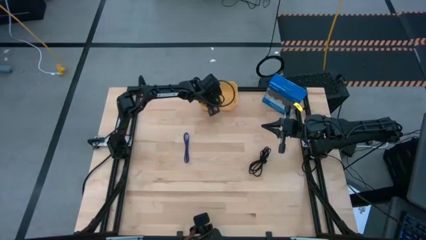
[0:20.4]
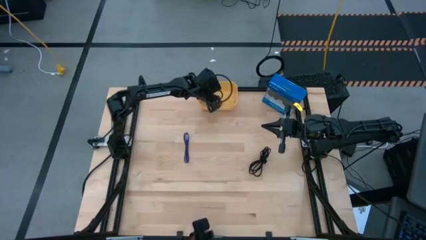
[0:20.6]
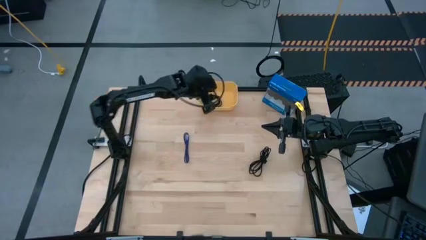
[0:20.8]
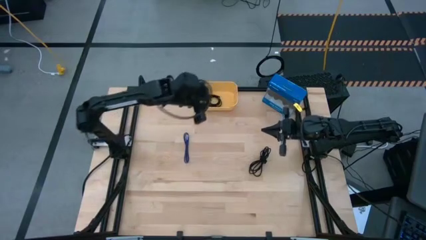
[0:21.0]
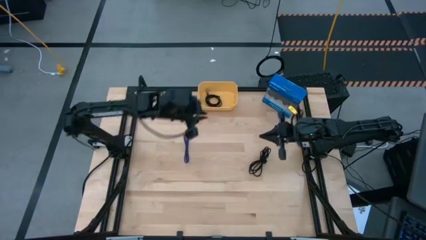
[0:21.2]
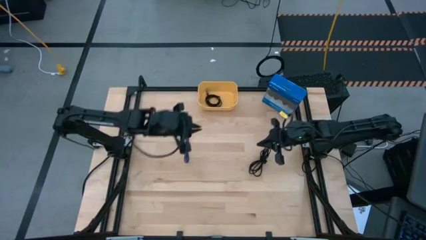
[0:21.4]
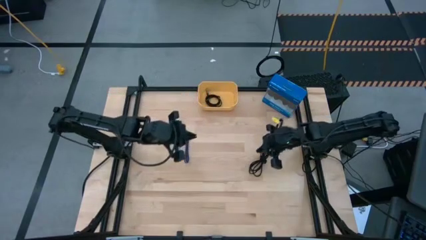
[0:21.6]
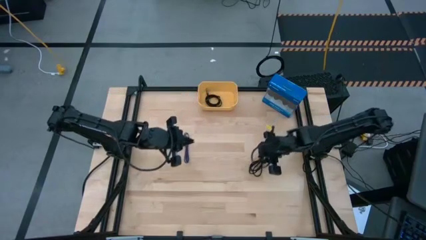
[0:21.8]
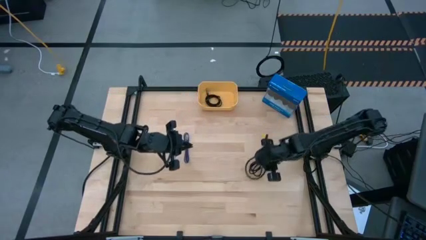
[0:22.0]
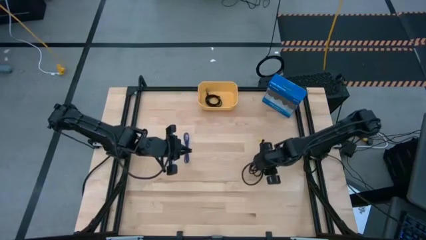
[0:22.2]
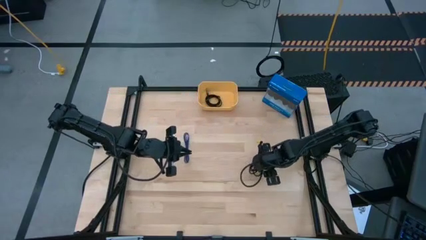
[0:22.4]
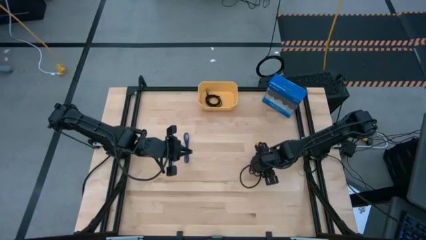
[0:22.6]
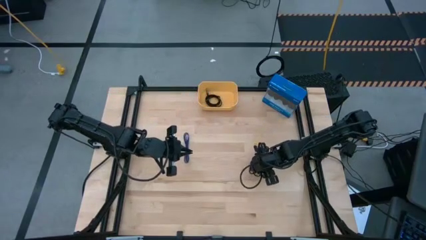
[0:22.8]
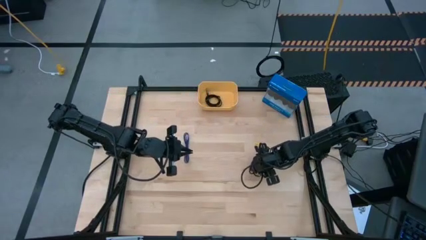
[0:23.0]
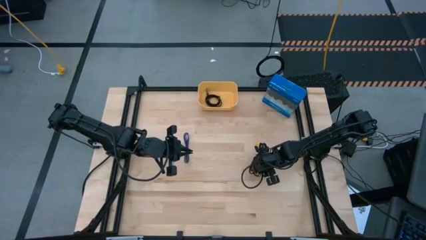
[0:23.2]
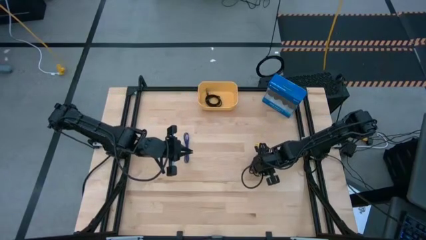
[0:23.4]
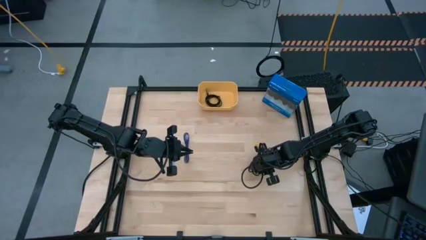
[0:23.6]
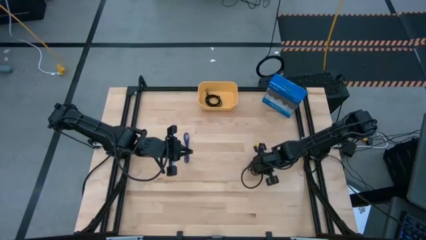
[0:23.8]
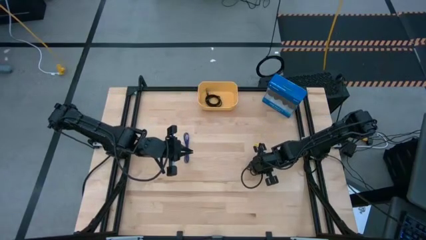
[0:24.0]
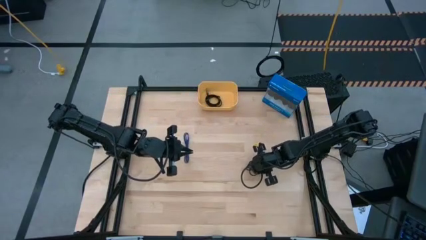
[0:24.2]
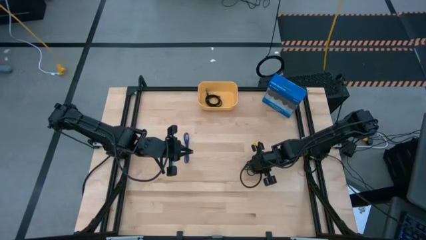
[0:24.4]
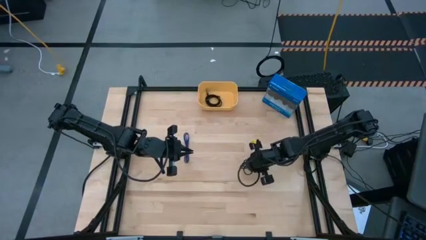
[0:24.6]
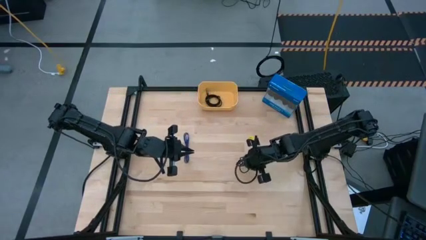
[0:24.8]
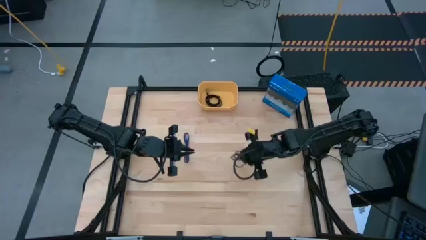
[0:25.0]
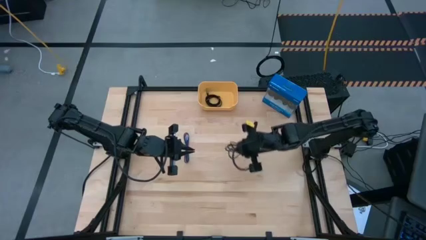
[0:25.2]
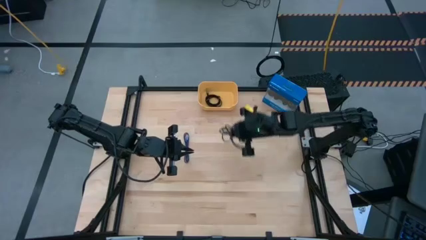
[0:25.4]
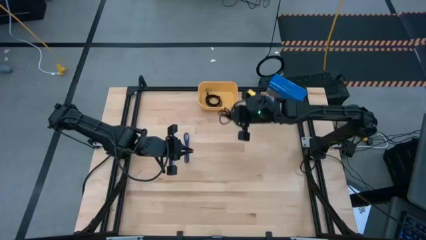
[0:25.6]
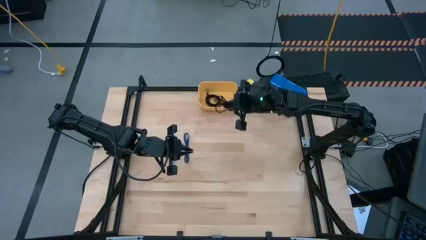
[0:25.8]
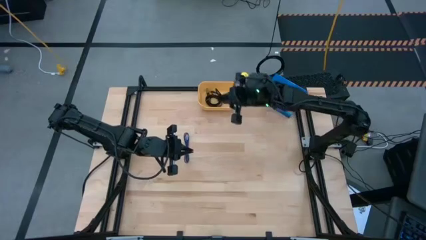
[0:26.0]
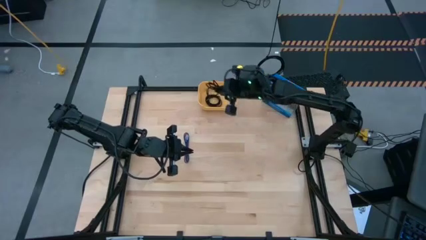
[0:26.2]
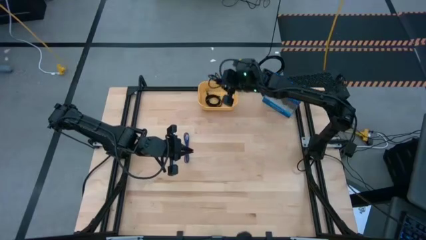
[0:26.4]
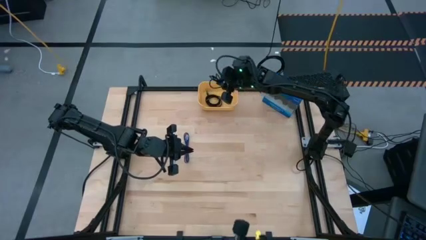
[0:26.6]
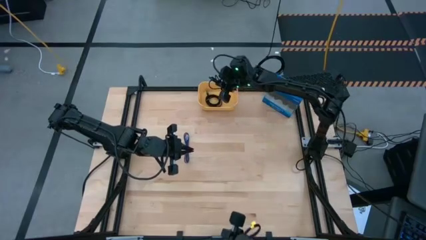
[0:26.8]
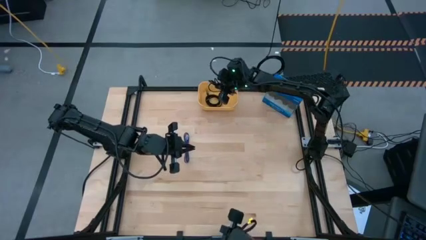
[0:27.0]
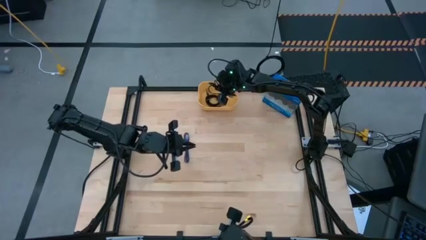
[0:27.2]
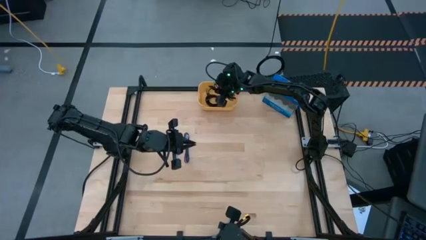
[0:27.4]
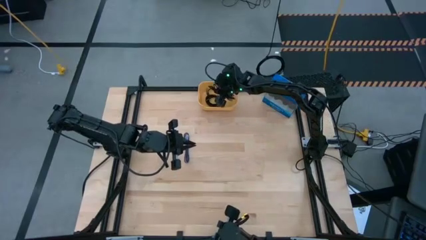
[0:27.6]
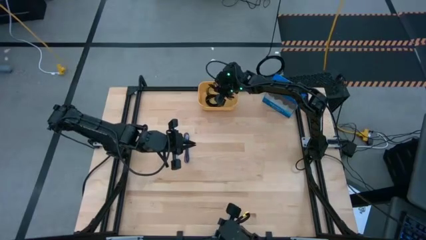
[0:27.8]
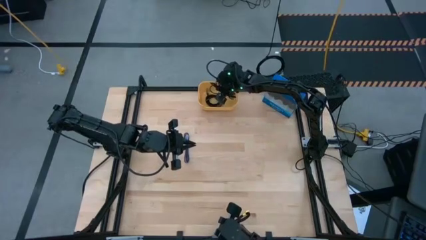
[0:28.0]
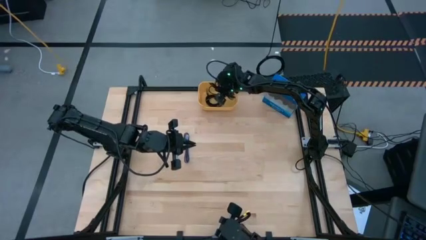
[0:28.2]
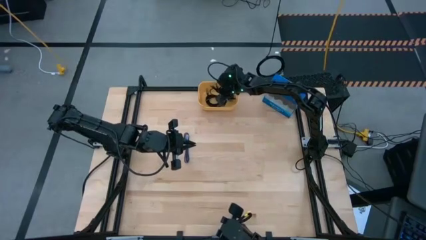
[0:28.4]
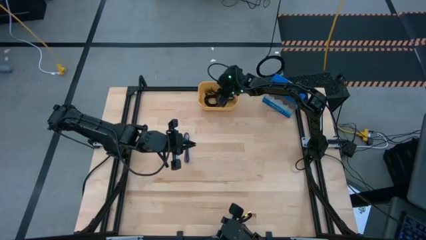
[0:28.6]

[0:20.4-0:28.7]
Task: Pick and place USB-C Cables
Put the black charger cable into the yellow bin

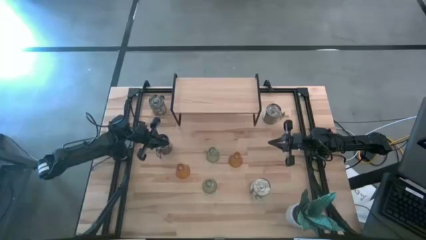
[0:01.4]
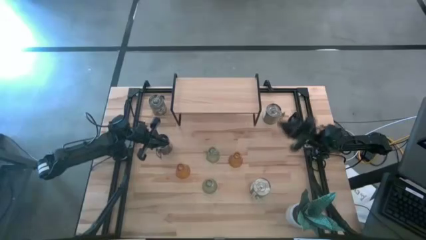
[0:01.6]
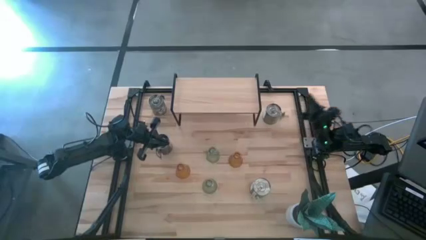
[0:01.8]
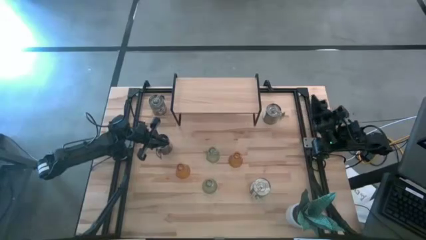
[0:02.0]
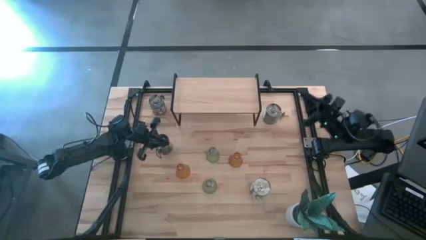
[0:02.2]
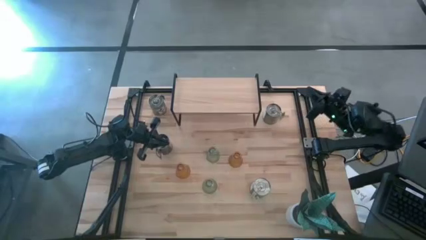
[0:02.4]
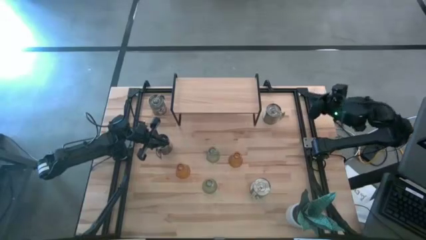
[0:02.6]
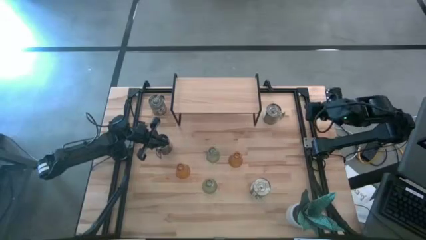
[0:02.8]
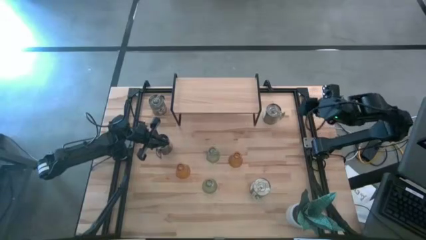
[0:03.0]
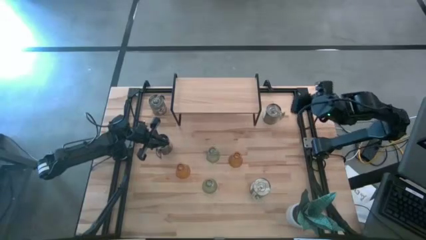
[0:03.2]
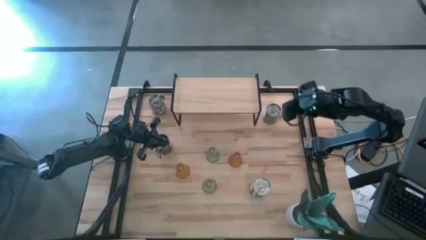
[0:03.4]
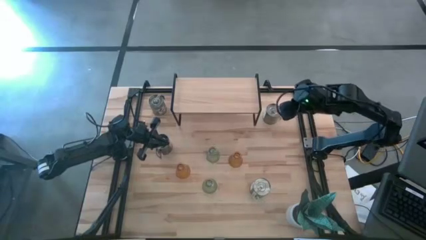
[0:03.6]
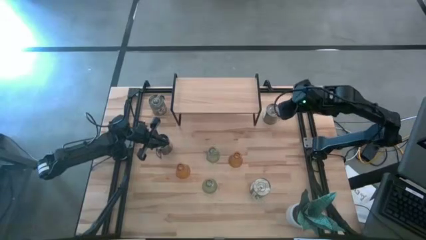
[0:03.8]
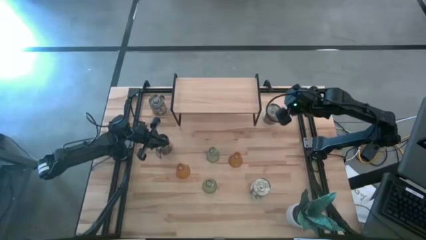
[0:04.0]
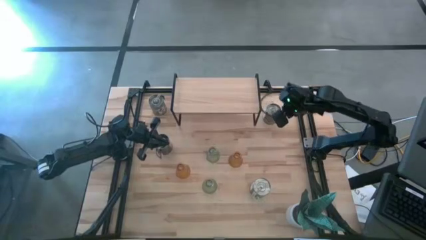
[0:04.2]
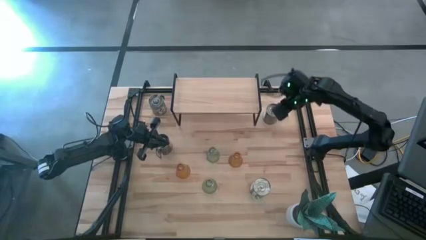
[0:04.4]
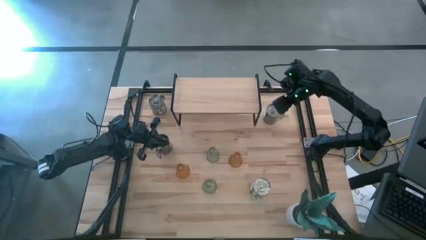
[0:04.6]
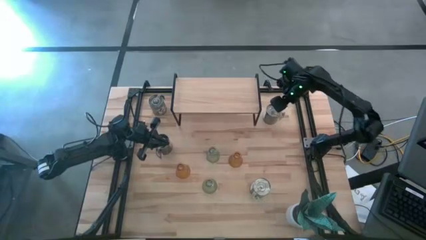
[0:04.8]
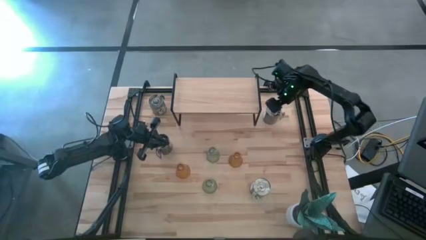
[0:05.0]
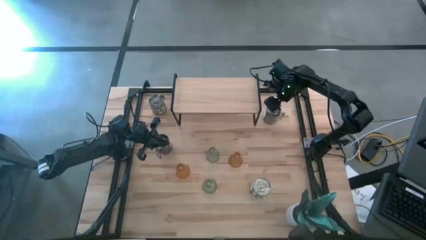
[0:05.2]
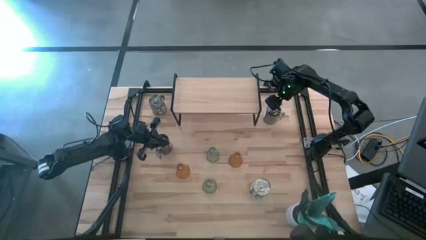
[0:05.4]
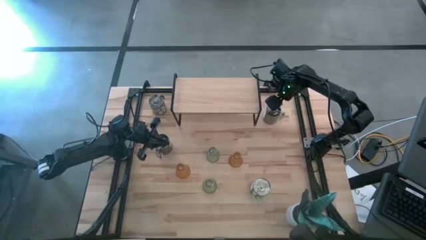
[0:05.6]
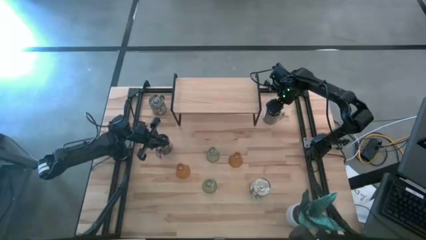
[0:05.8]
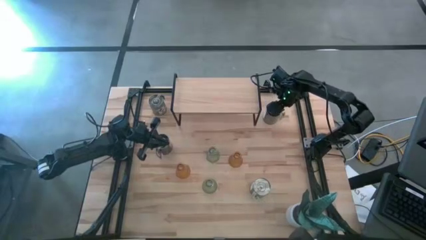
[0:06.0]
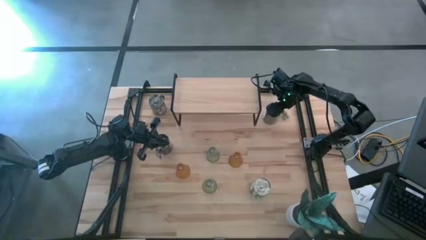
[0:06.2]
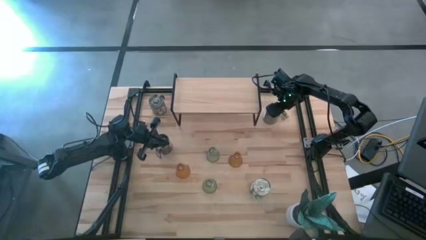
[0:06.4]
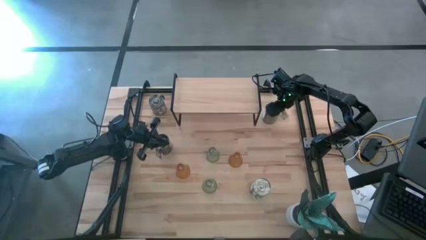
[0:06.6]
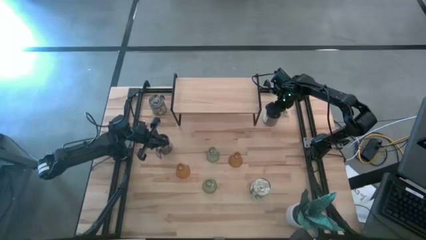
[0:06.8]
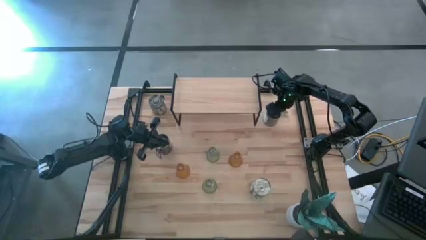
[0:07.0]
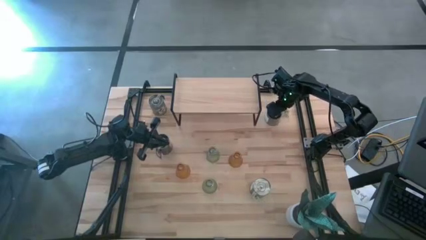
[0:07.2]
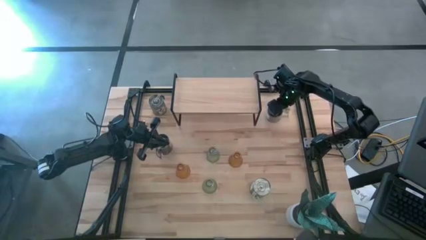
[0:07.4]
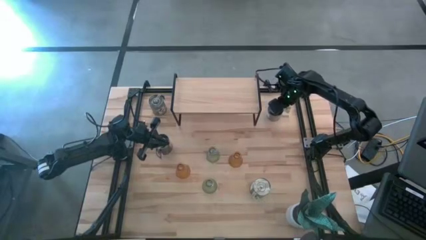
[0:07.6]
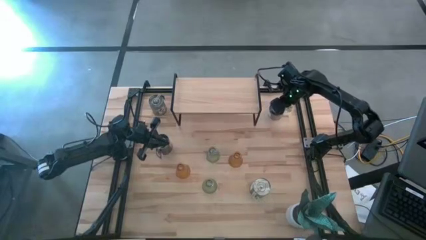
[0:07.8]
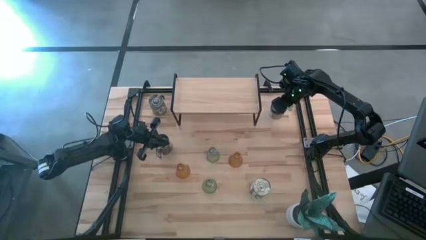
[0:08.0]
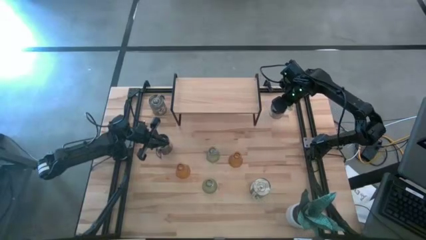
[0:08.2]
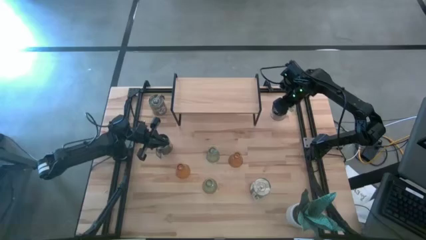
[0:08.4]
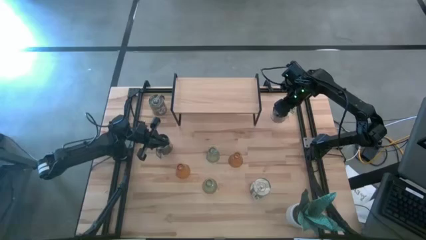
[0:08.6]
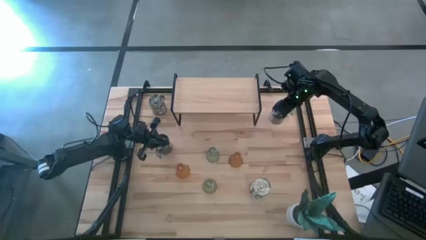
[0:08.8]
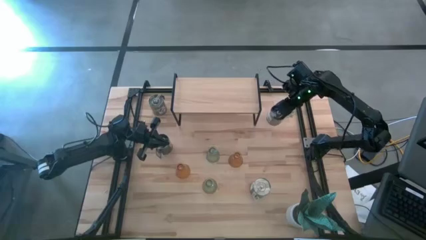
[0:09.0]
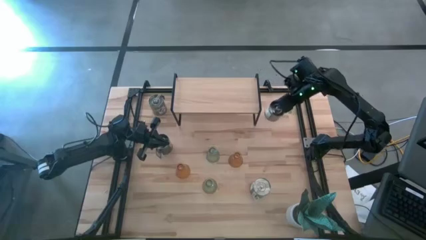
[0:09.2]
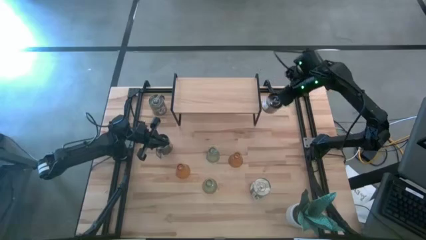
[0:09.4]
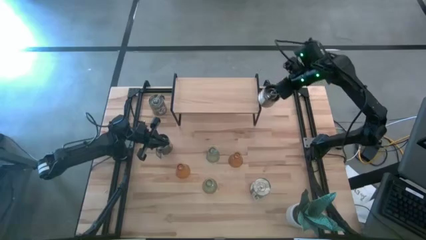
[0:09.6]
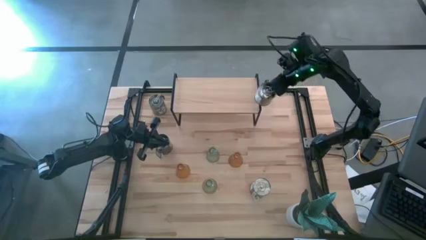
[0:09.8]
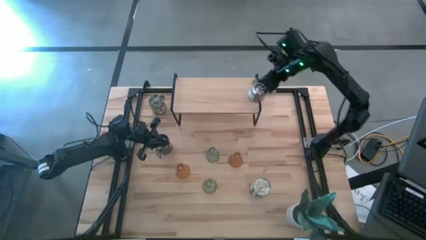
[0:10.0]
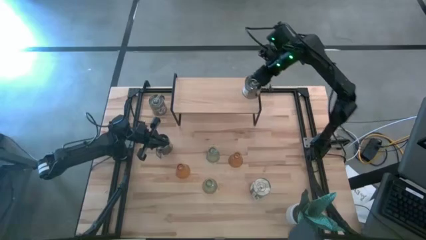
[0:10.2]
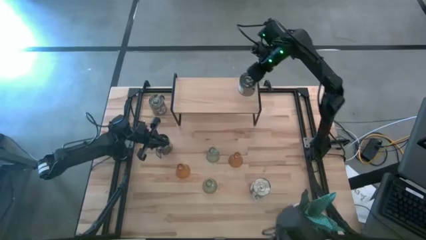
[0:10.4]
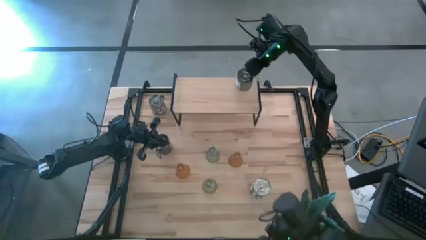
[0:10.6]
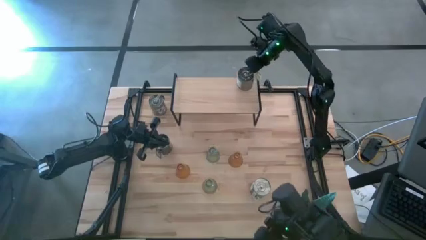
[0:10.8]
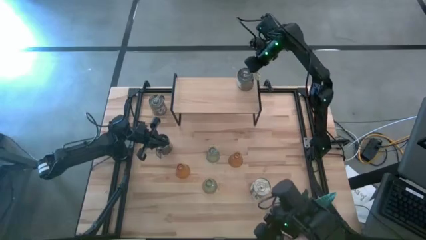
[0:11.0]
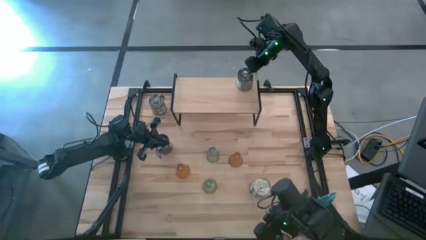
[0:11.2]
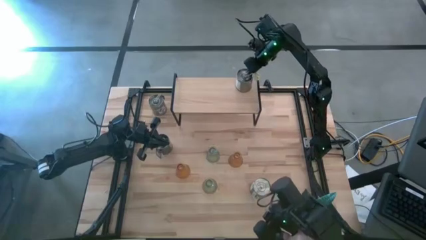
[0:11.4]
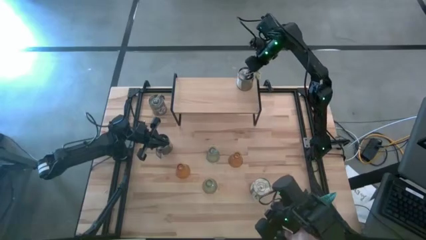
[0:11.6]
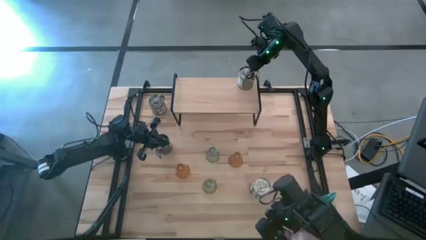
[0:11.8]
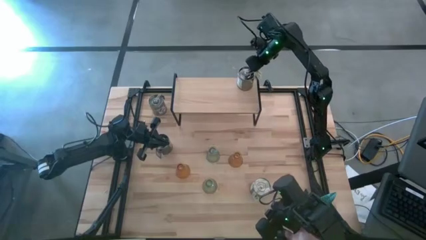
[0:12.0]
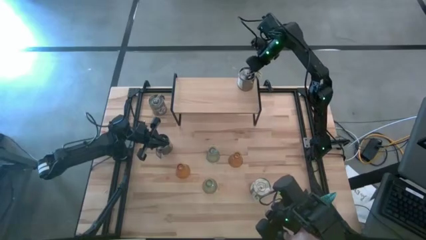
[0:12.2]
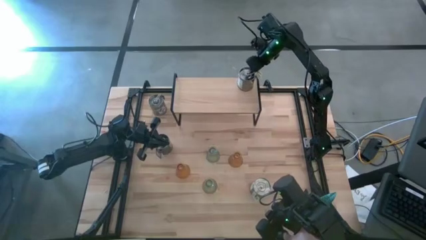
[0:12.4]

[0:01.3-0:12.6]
Task: Pick & Place candle stick holders
Put the silver scented candle on the shelf
